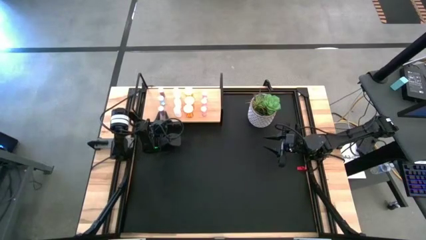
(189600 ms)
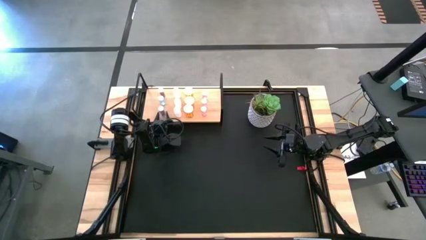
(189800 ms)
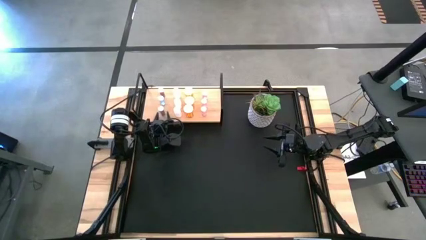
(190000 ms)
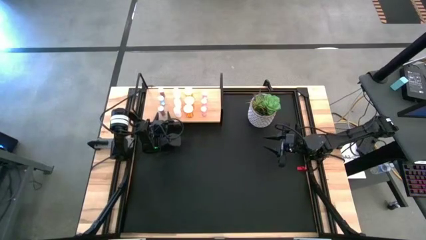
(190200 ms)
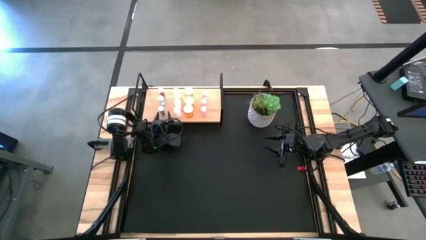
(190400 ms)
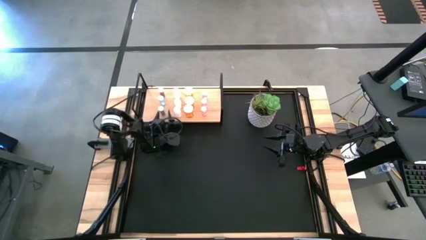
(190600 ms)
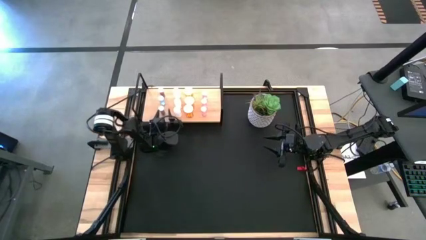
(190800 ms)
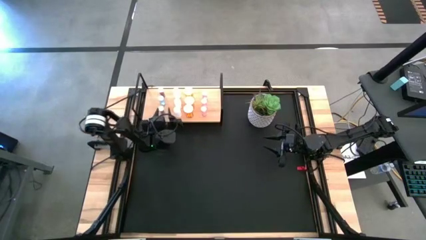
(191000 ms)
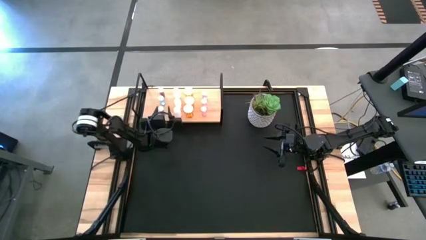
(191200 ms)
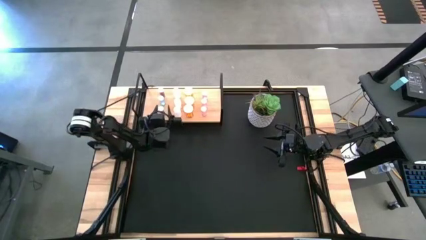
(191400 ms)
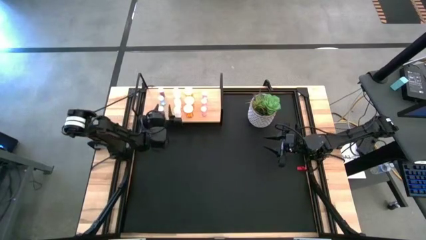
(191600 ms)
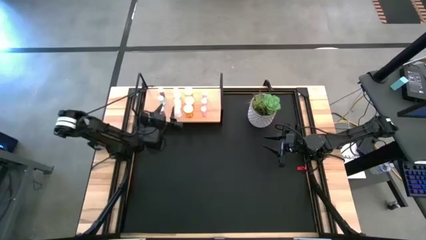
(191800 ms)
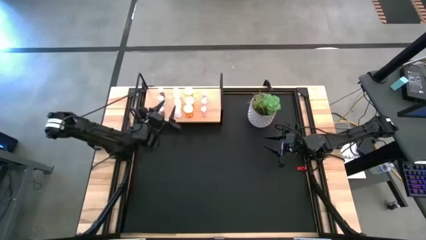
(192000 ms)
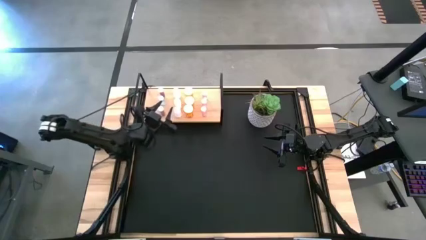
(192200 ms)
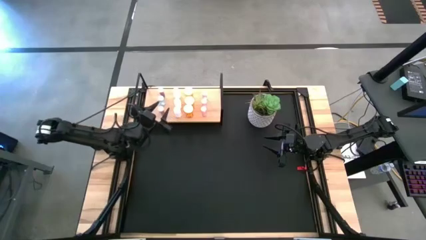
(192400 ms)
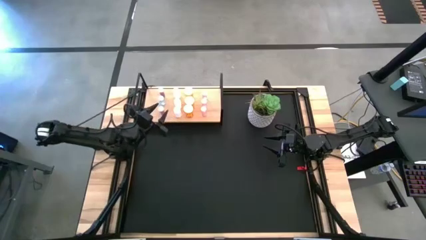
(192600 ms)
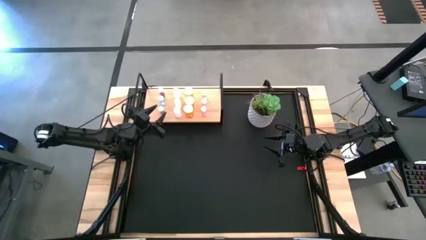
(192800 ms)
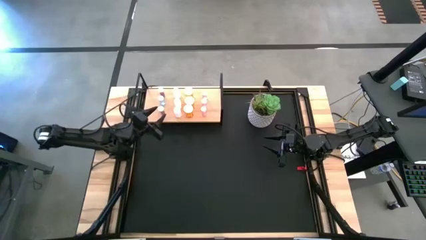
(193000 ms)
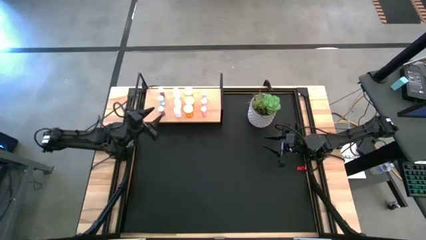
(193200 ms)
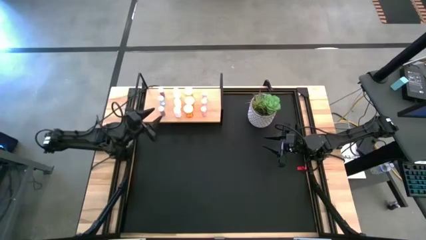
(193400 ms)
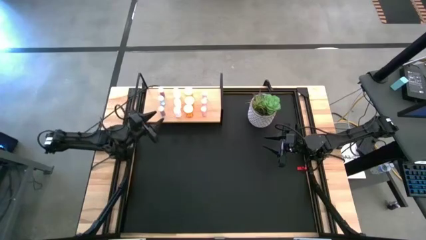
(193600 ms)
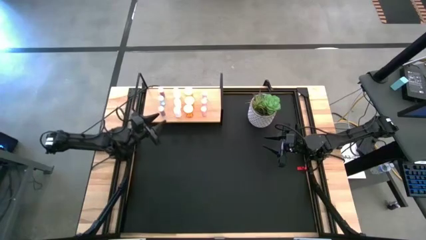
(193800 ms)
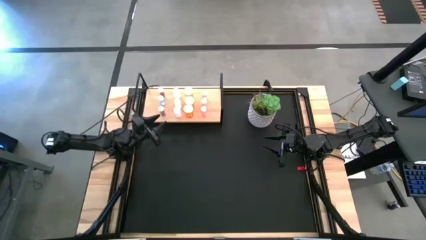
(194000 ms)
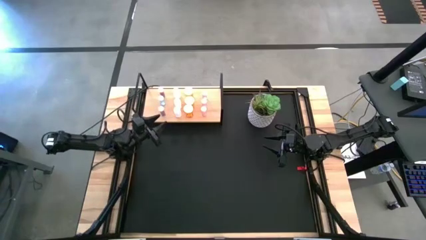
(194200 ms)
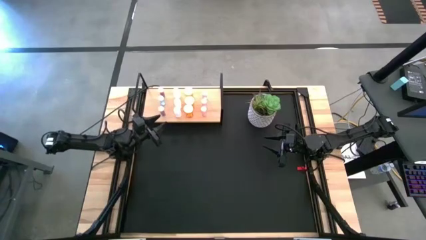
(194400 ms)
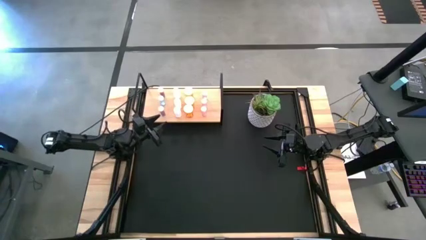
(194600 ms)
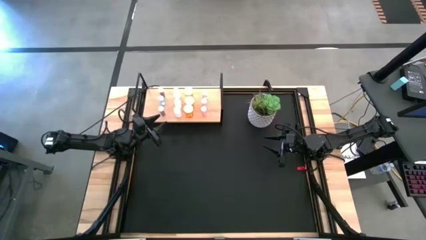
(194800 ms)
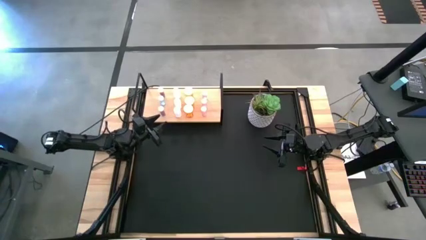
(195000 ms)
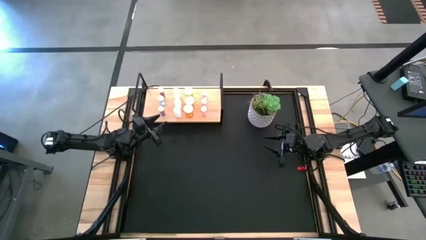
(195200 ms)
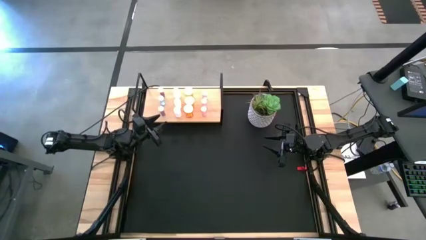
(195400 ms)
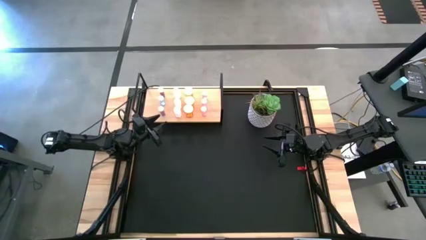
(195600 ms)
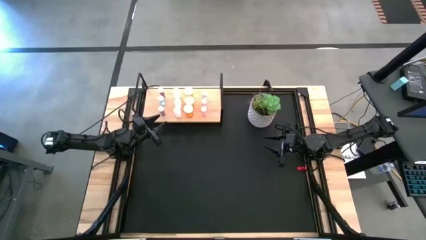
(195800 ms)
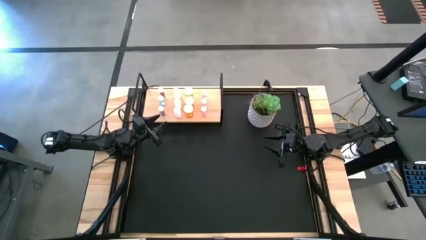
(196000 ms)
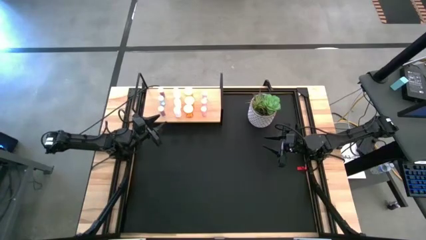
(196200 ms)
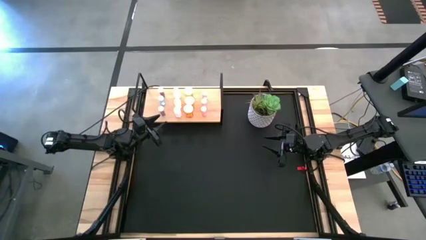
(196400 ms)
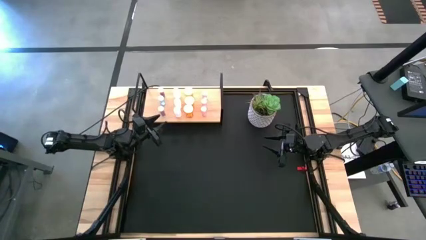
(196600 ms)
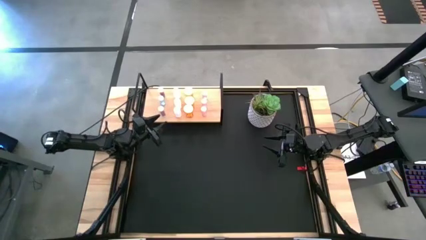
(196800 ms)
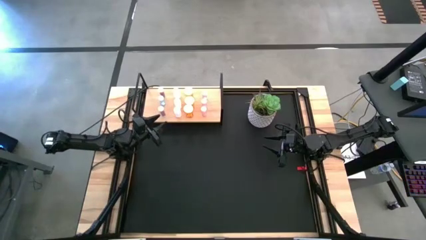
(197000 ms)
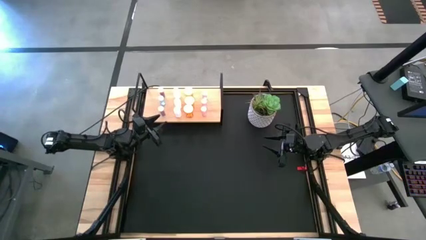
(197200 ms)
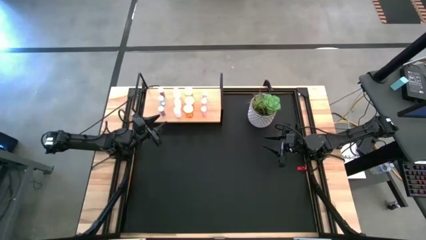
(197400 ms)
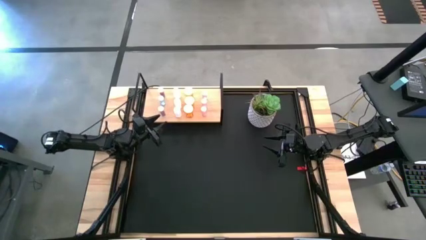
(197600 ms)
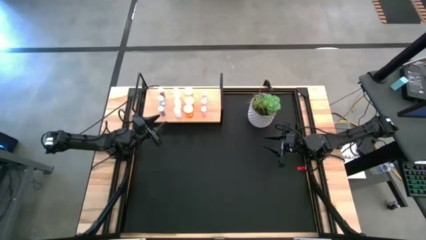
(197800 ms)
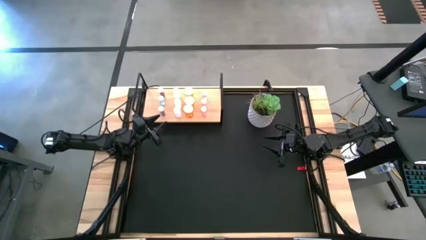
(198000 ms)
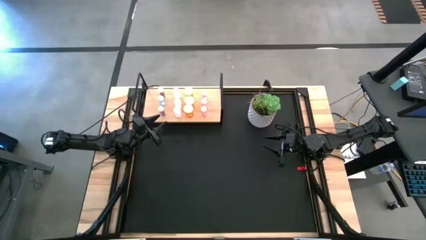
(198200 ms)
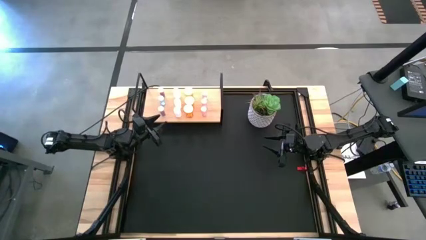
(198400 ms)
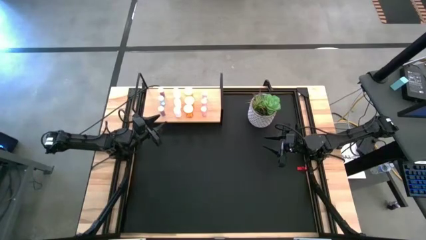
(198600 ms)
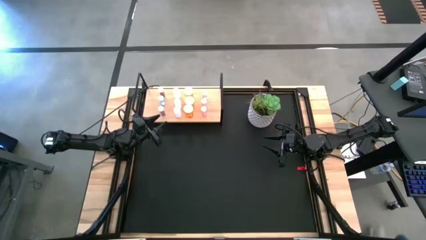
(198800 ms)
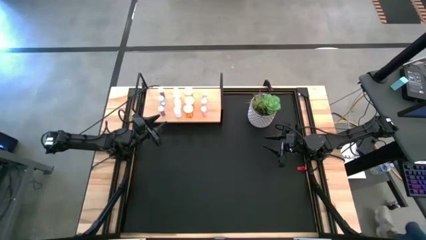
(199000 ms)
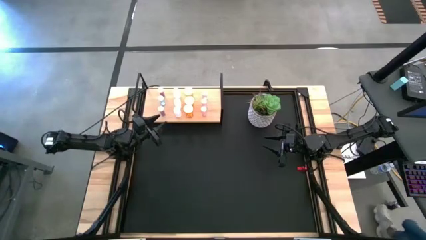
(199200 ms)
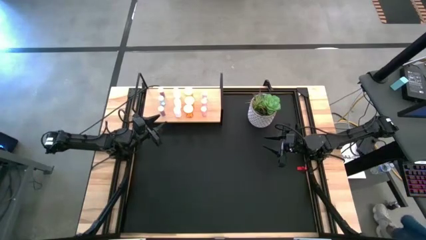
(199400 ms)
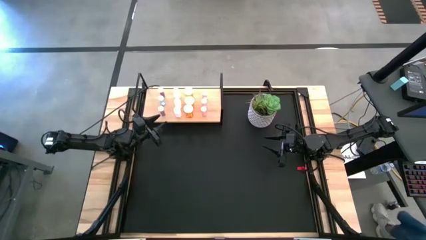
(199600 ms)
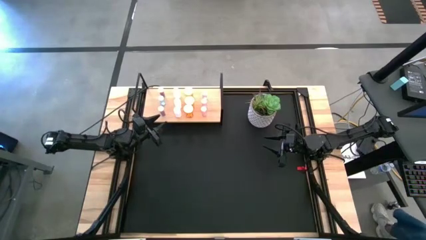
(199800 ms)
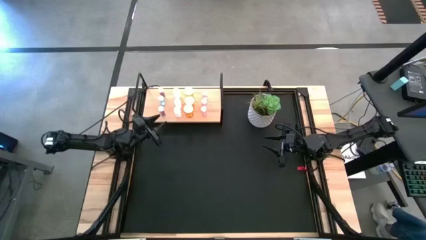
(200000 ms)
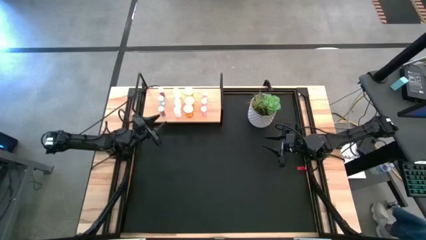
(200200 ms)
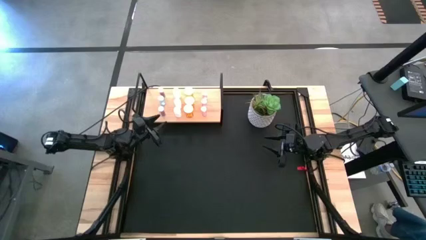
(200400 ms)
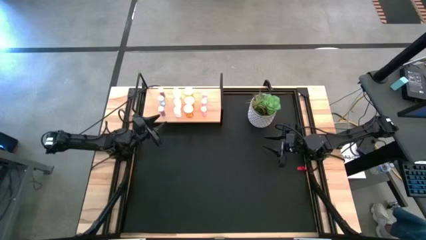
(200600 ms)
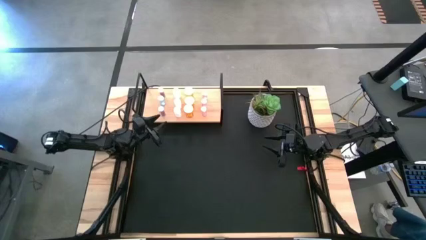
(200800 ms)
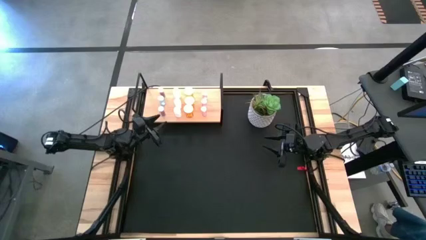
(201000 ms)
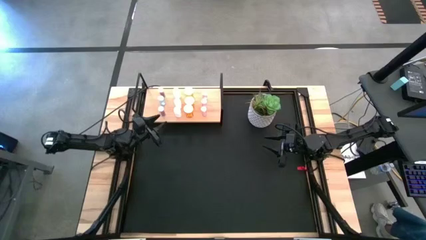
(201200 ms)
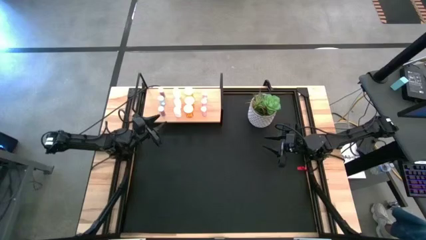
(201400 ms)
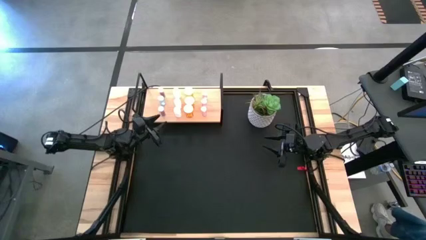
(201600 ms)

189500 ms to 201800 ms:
Task: Pick and place medicine bottles onto shelf by color
Return to Home Position
